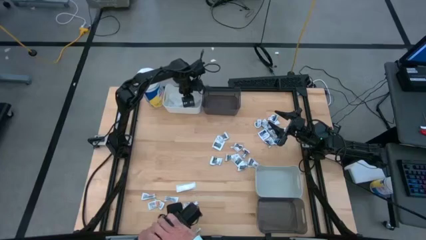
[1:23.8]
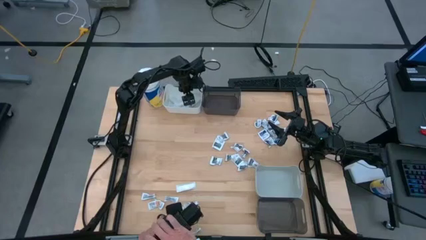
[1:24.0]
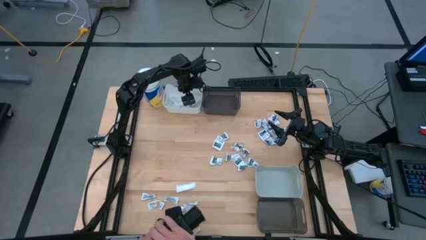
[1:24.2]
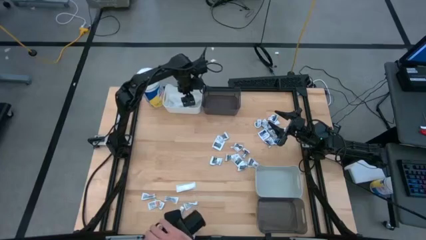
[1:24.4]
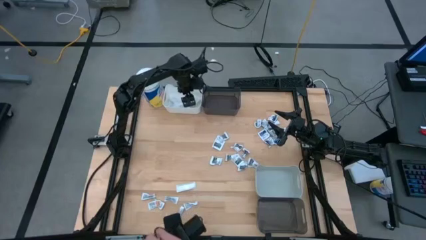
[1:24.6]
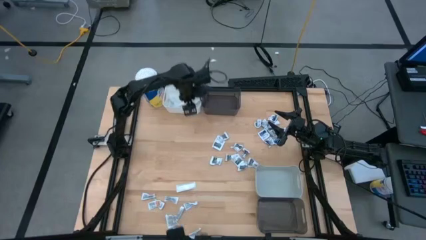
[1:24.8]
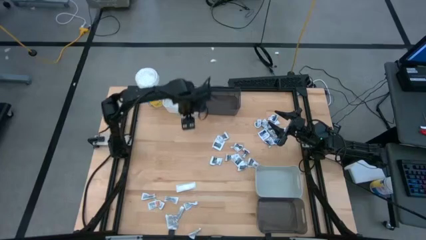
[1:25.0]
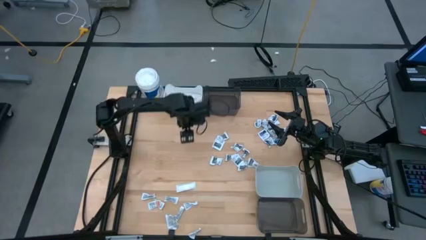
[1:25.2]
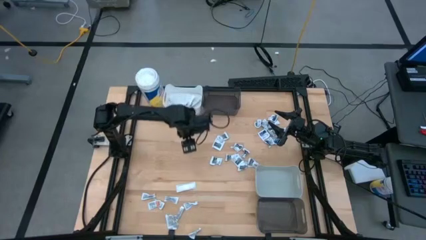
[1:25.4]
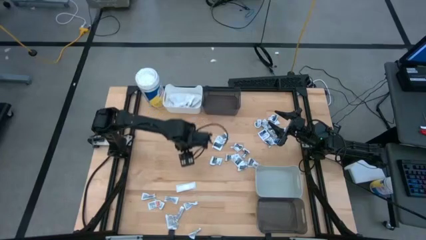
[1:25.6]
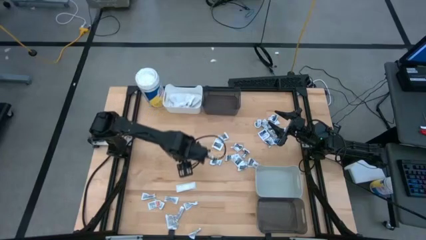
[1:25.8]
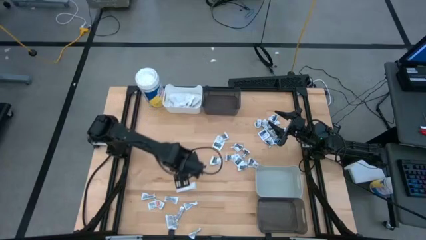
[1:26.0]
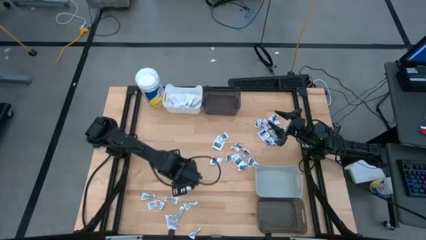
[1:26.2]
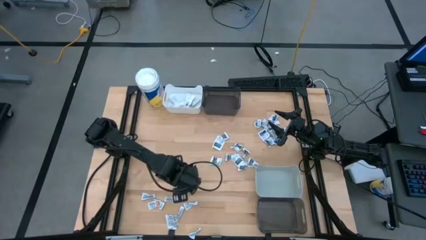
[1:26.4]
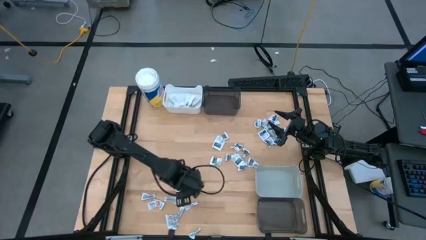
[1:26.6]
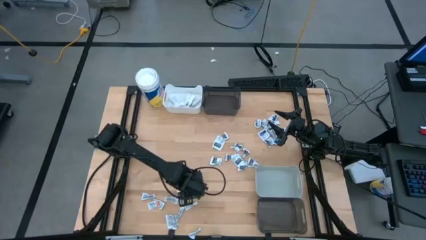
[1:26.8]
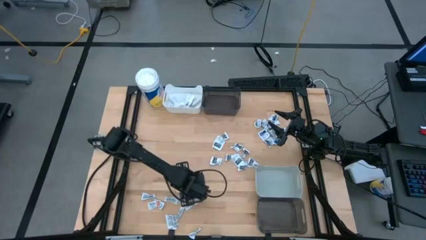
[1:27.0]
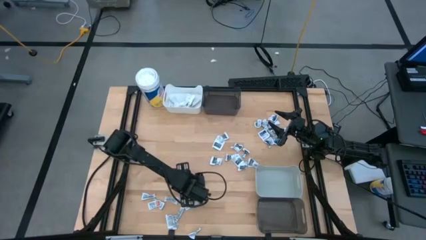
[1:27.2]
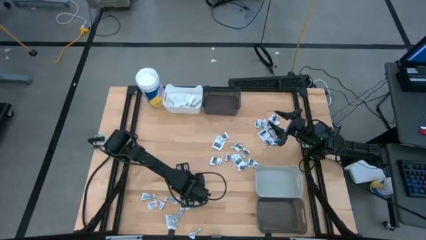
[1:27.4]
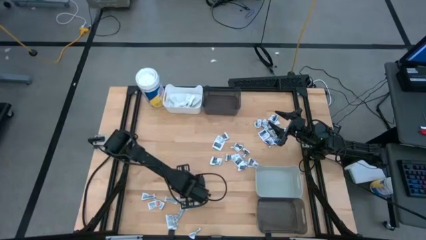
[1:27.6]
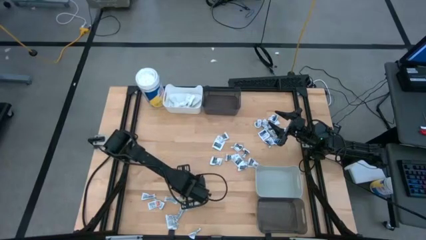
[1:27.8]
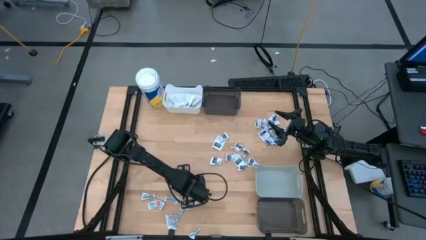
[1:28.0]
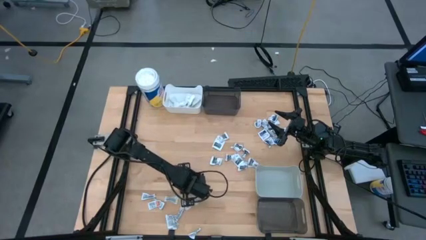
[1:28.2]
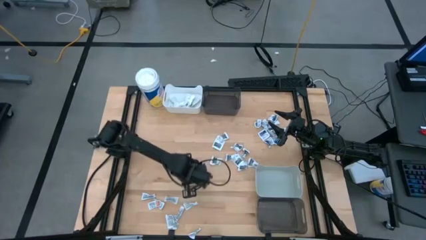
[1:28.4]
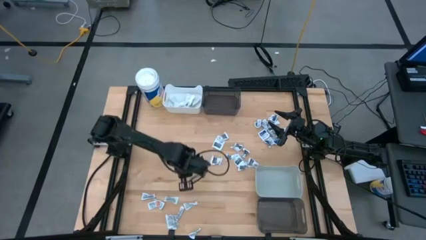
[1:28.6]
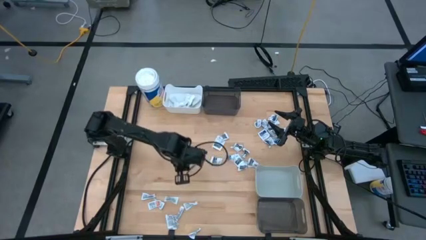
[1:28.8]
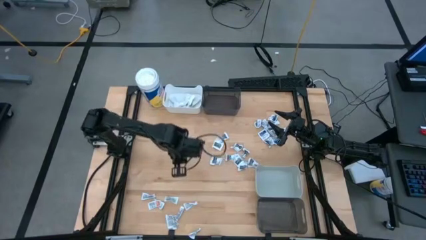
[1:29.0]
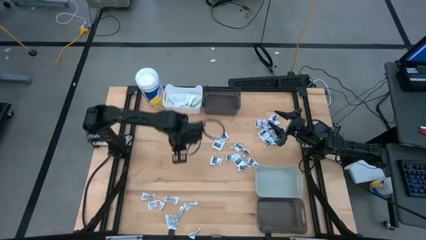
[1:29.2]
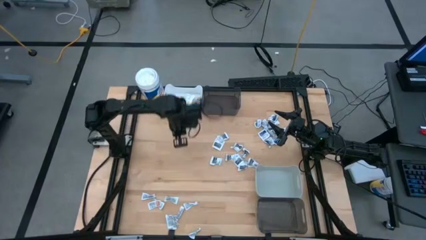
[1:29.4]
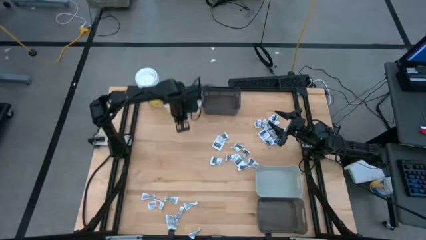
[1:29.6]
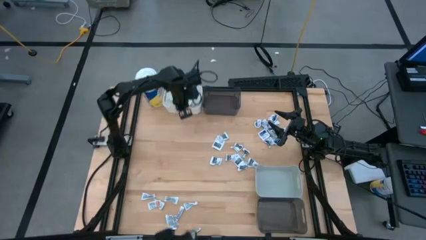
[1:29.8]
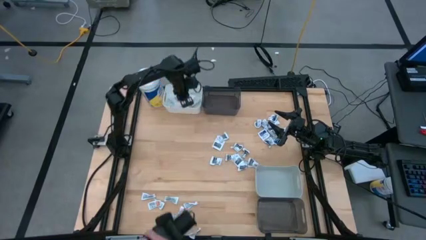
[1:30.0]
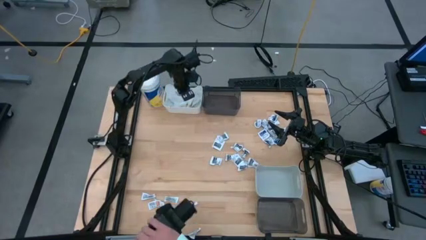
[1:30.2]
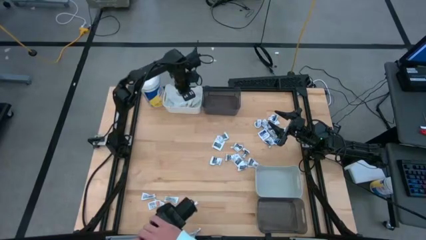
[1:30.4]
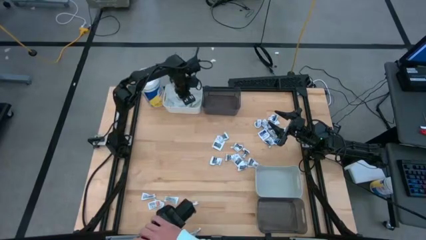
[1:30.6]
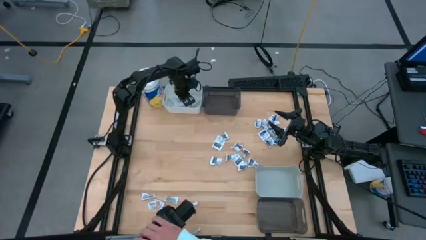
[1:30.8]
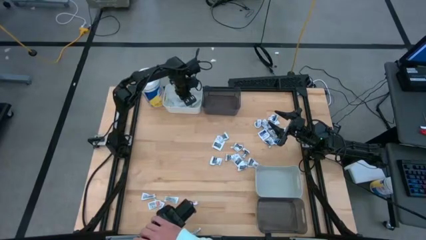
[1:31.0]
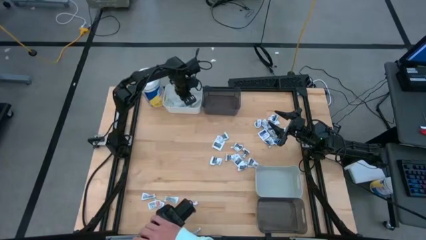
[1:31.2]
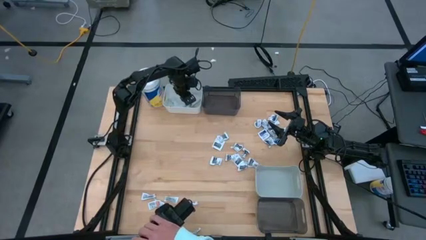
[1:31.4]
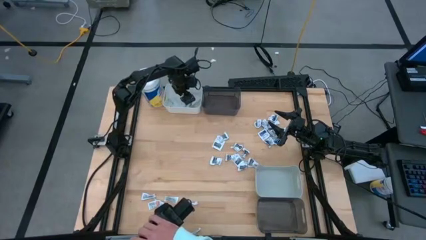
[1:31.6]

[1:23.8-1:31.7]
Task: Pick & Place First Aid Supplies
Put the green bandage into the white bin

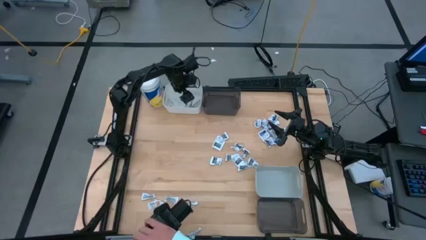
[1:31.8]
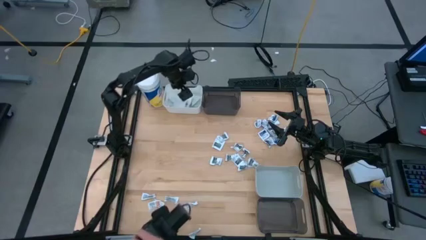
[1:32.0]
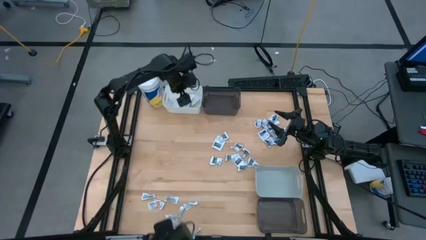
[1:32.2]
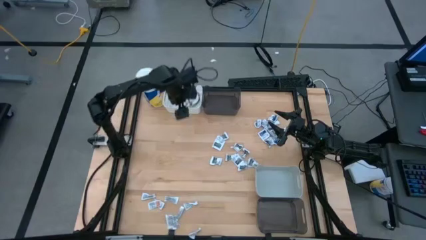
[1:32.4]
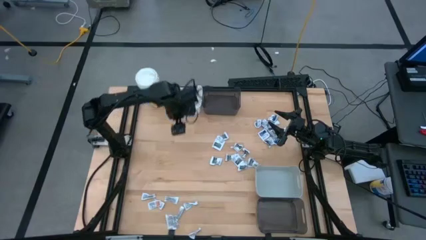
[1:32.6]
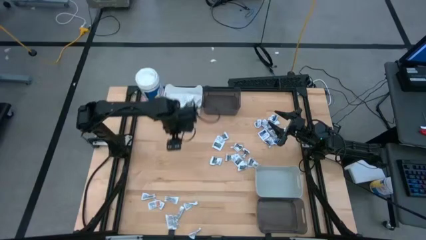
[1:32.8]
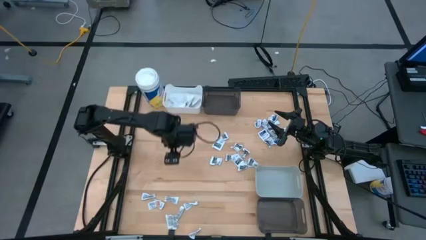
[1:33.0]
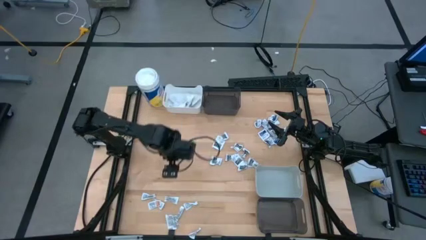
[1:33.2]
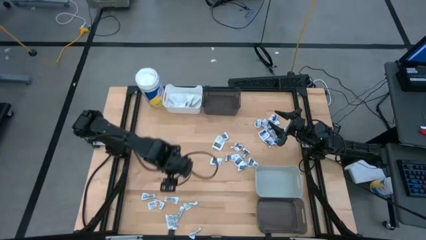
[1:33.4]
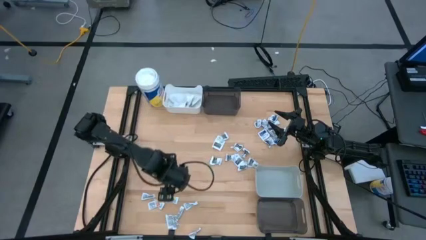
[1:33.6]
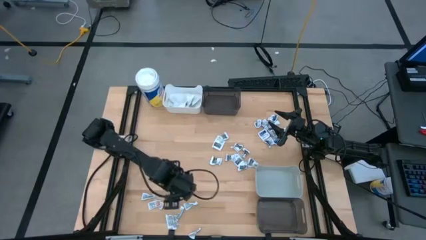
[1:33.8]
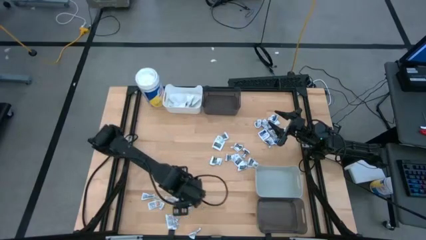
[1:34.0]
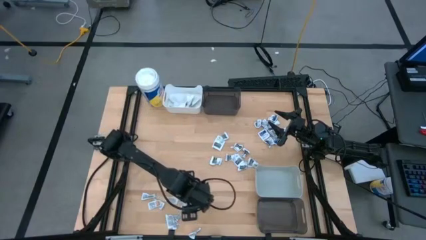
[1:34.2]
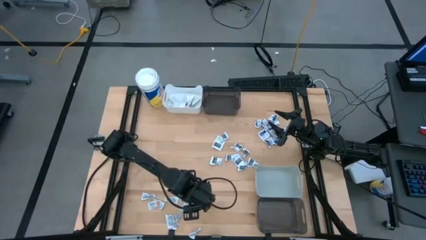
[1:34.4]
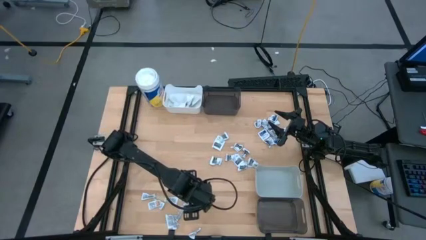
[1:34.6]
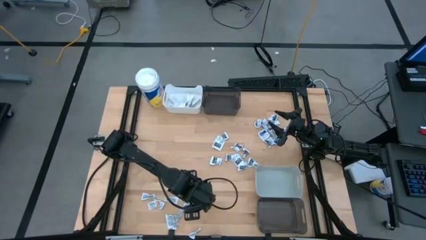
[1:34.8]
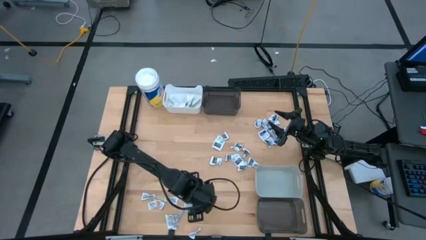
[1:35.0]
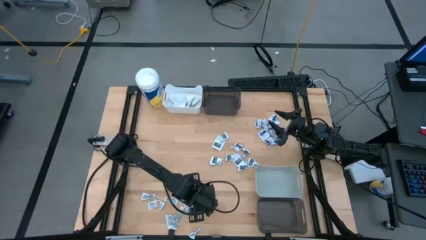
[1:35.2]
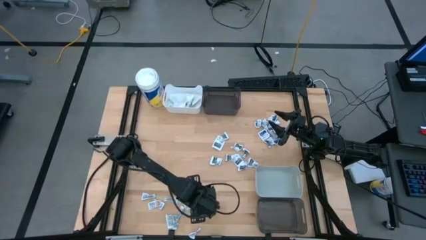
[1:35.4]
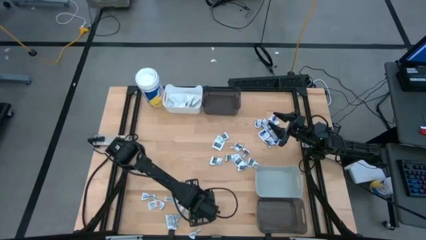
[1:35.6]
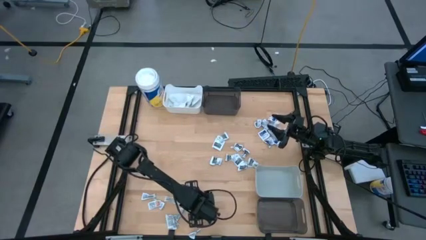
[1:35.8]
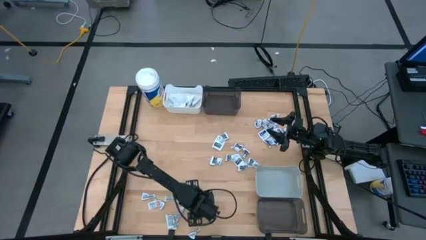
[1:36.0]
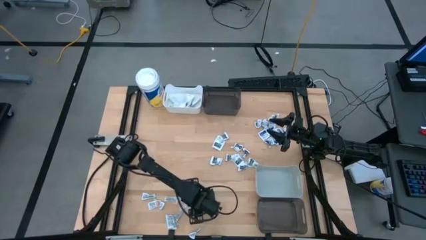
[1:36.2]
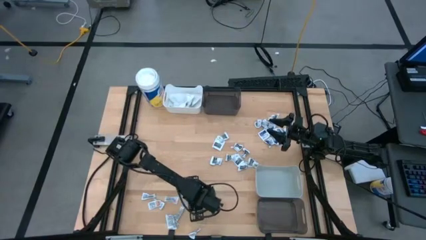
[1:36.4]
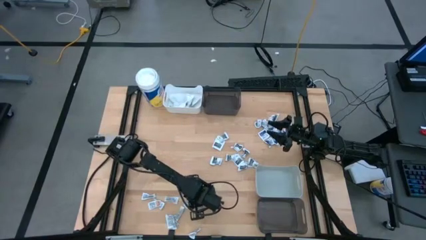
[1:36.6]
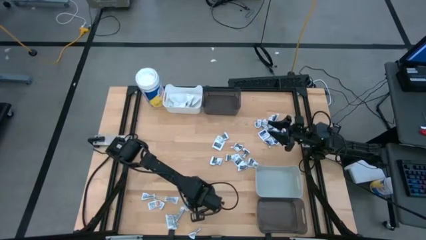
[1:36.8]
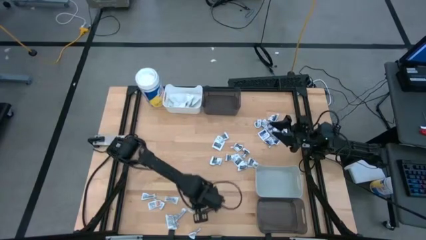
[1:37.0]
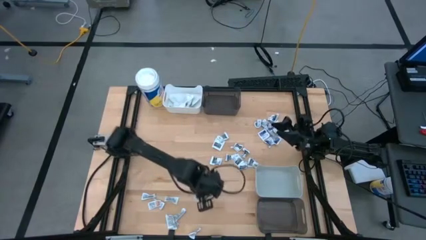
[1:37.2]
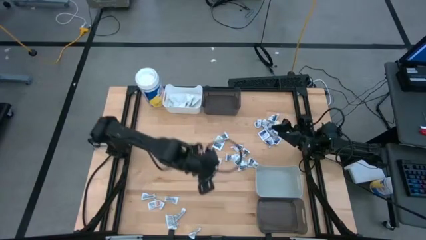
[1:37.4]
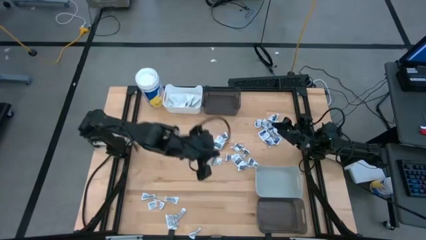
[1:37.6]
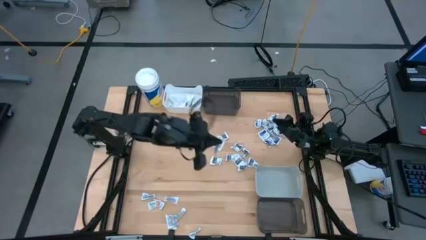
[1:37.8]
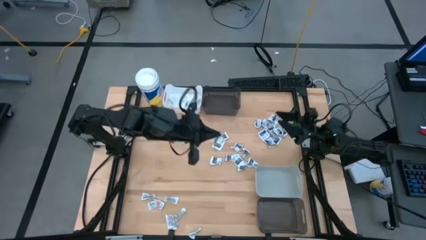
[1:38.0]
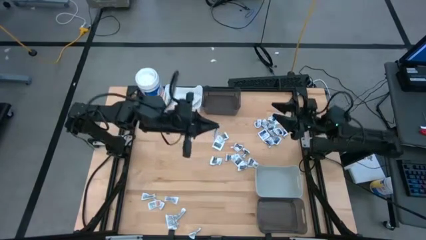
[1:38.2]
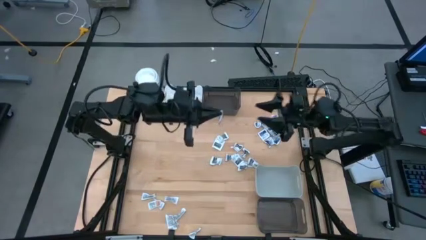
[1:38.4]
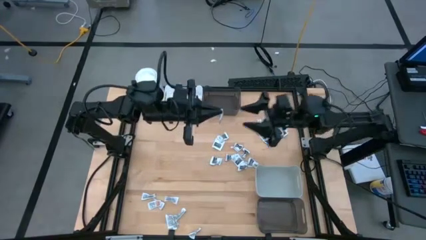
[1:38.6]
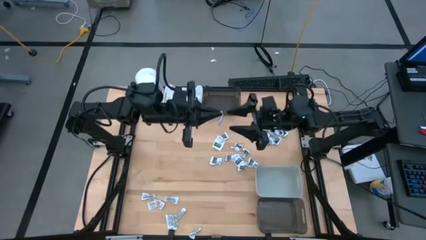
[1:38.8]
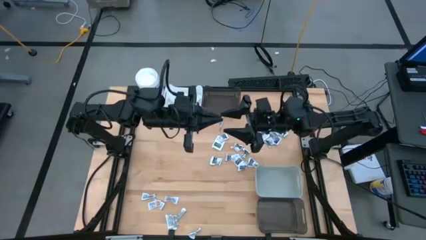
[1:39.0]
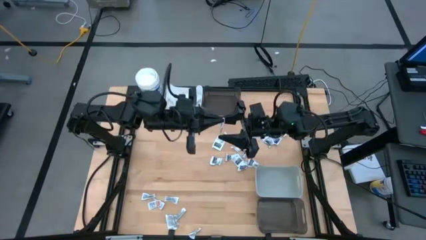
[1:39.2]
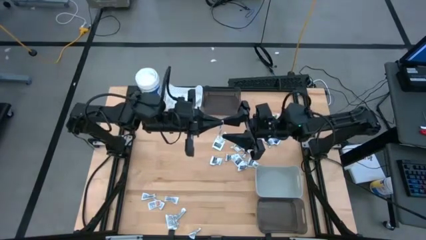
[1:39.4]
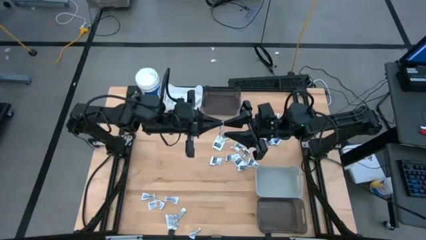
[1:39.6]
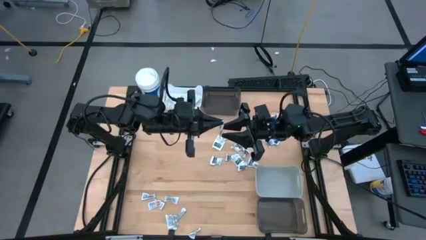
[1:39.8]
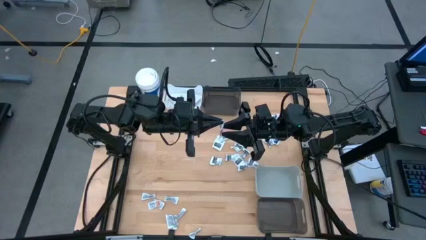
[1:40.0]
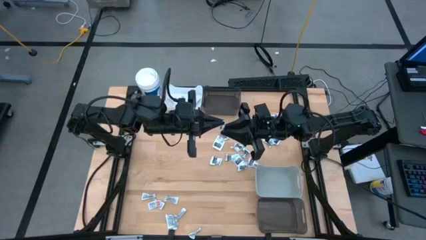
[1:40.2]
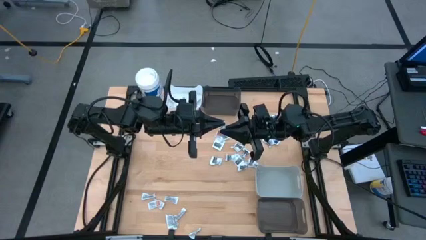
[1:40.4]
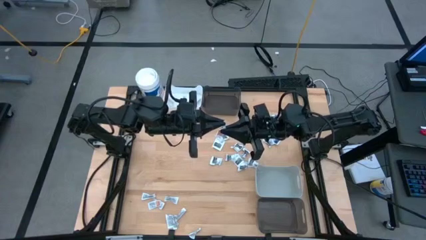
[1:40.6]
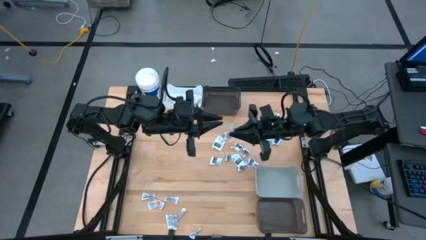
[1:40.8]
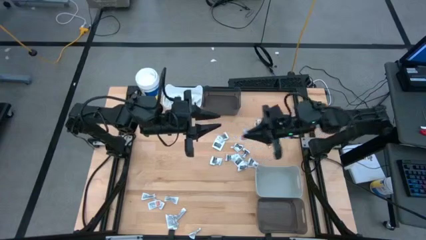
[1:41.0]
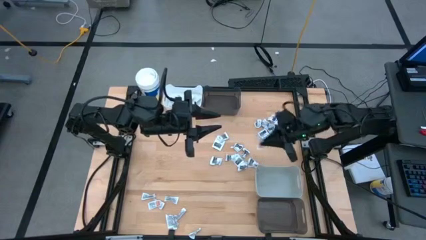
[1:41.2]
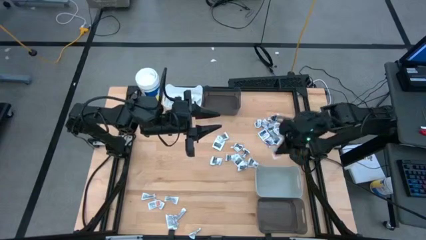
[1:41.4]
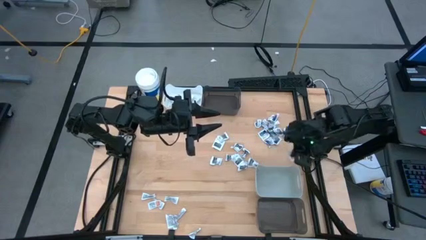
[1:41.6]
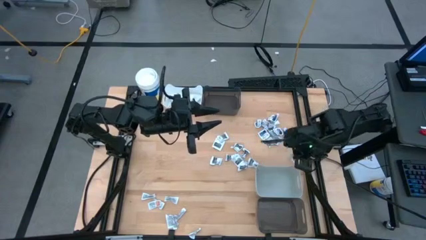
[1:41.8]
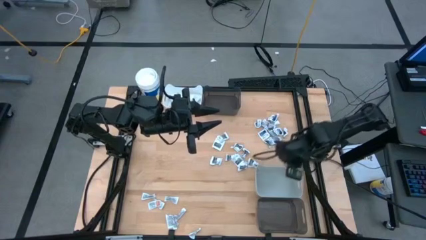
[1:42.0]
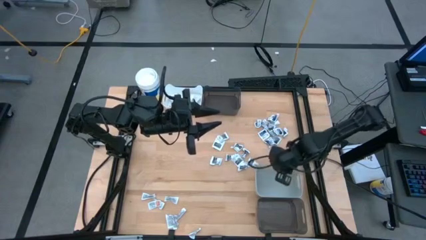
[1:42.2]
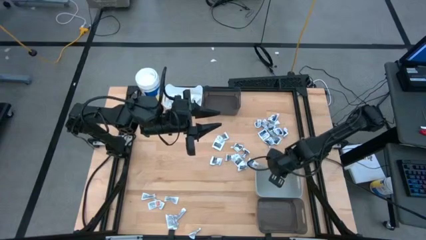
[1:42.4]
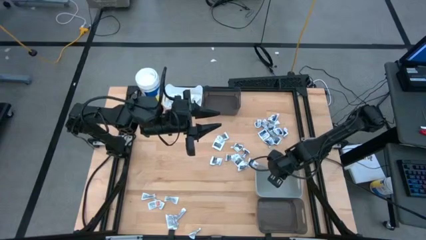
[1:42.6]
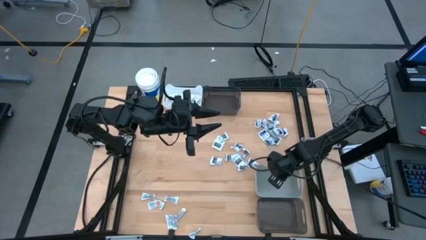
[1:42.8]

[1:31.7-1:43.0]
Put the orange ointment pack into the gray bin
